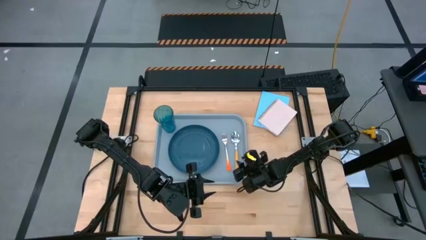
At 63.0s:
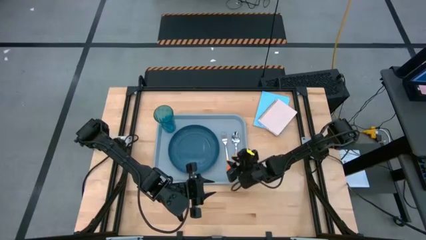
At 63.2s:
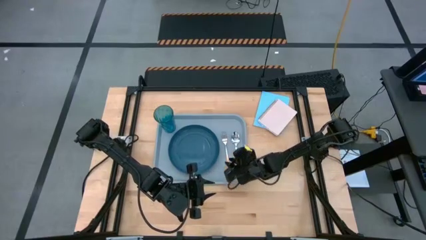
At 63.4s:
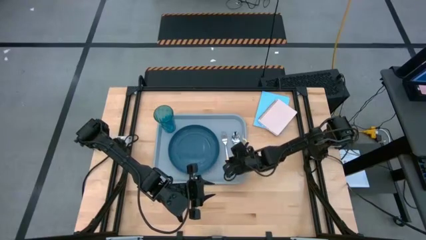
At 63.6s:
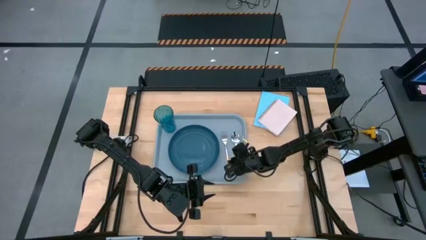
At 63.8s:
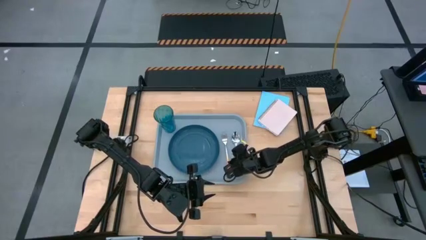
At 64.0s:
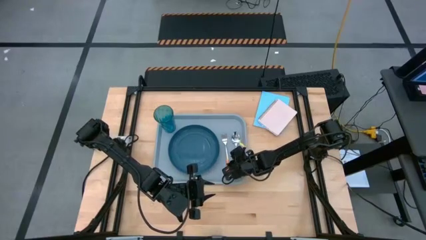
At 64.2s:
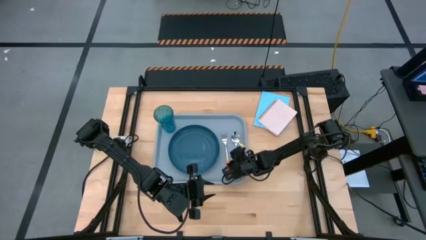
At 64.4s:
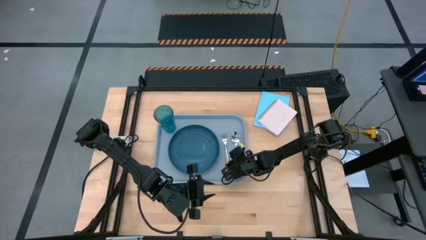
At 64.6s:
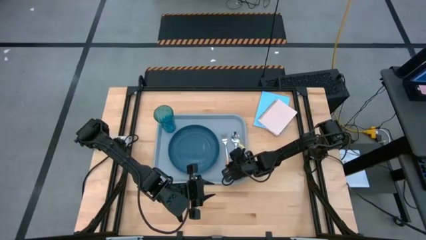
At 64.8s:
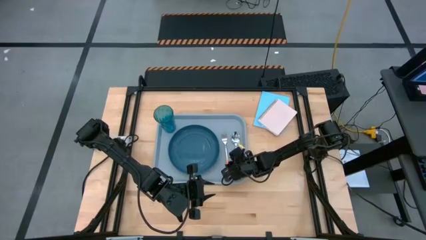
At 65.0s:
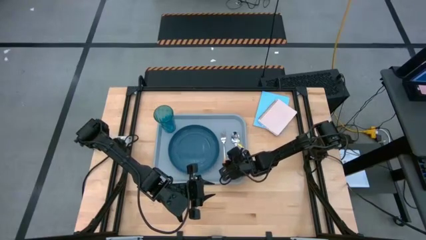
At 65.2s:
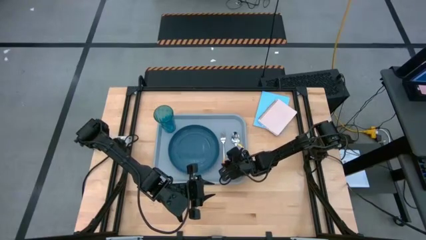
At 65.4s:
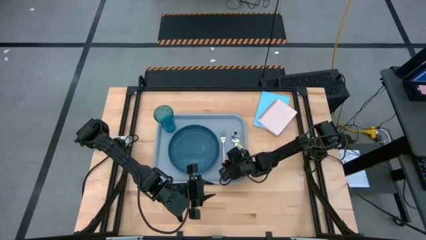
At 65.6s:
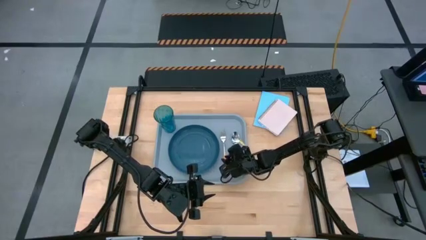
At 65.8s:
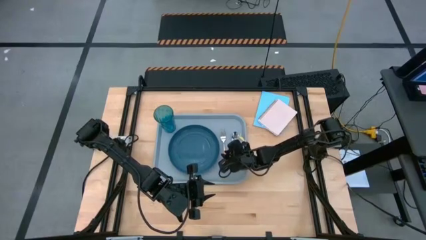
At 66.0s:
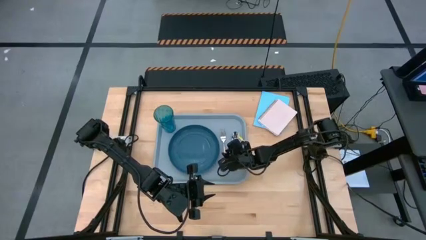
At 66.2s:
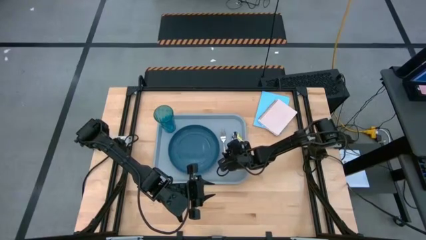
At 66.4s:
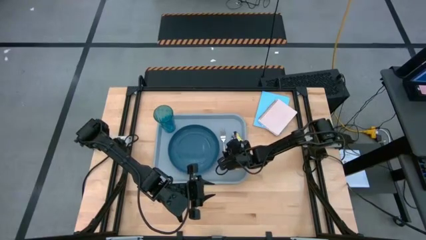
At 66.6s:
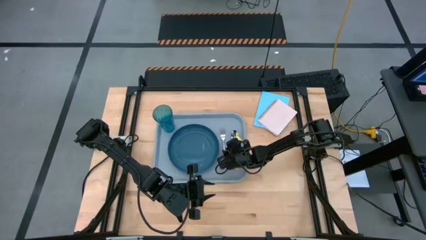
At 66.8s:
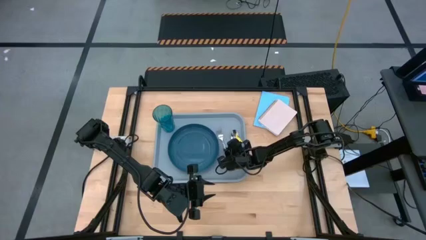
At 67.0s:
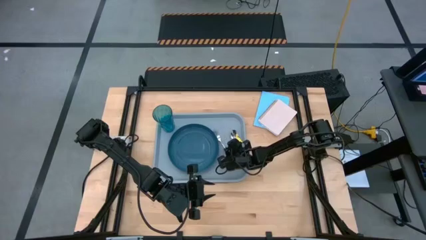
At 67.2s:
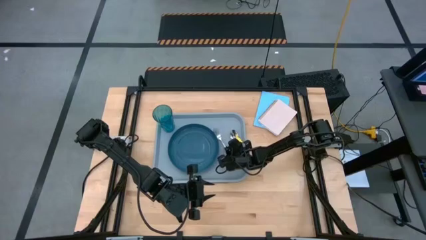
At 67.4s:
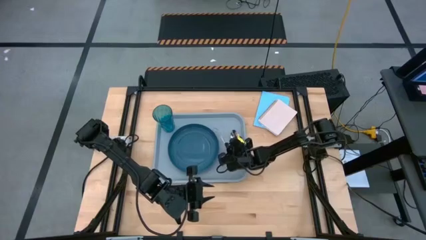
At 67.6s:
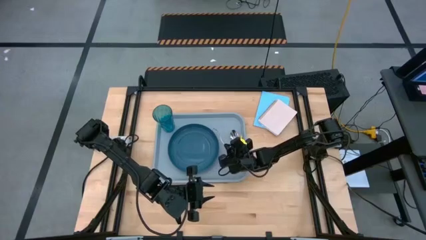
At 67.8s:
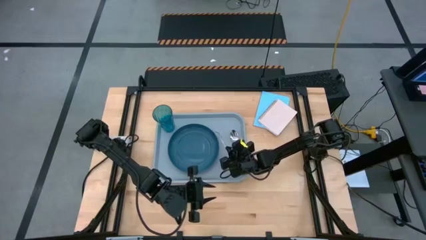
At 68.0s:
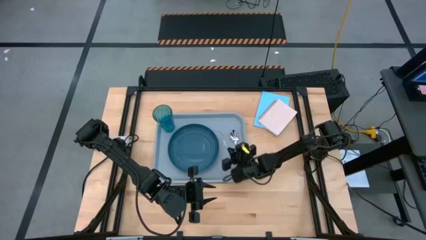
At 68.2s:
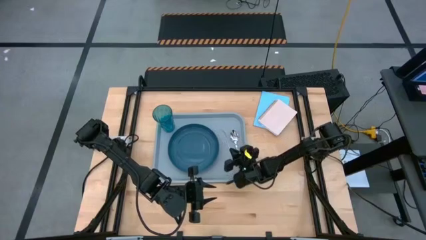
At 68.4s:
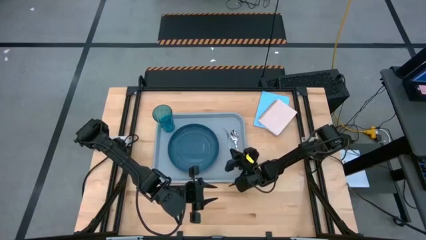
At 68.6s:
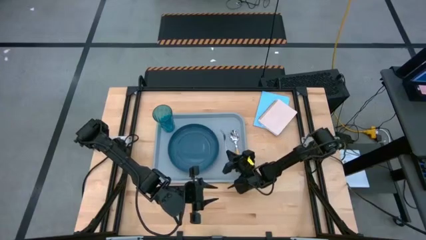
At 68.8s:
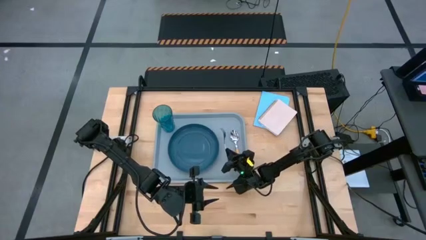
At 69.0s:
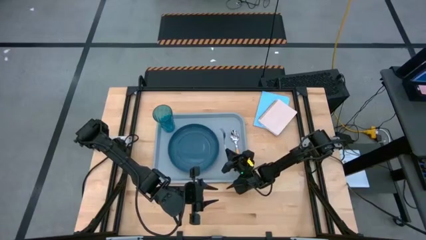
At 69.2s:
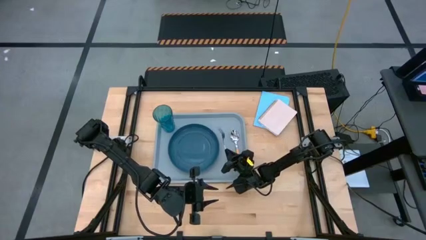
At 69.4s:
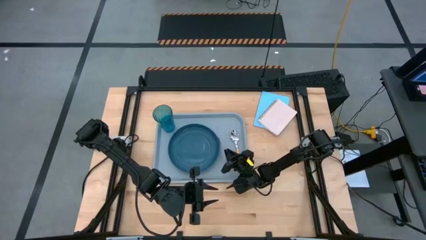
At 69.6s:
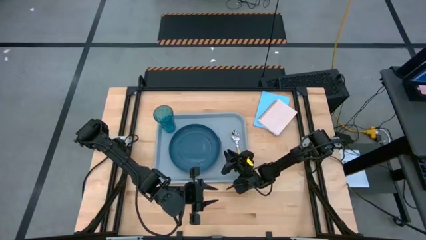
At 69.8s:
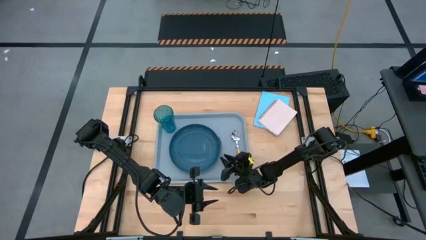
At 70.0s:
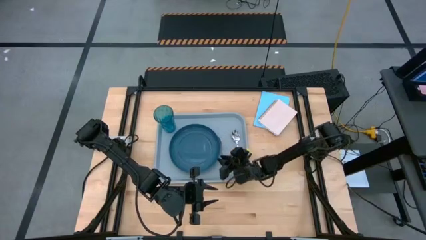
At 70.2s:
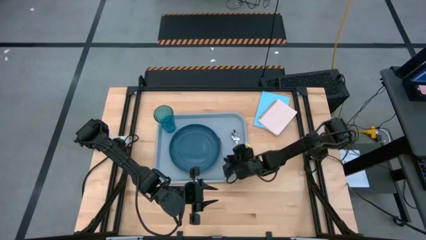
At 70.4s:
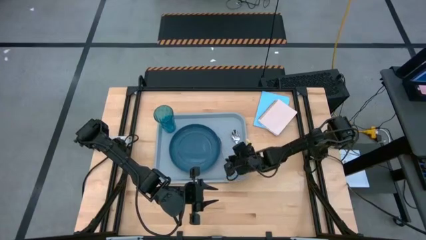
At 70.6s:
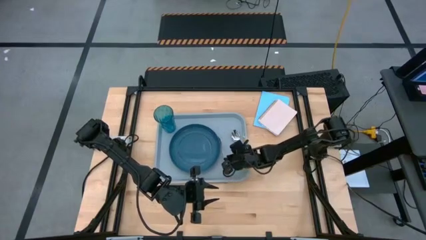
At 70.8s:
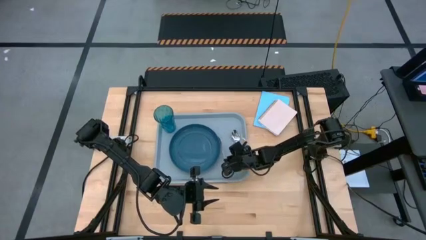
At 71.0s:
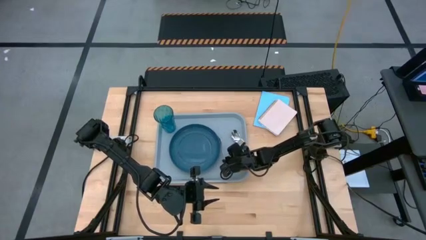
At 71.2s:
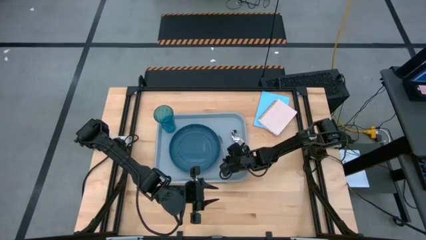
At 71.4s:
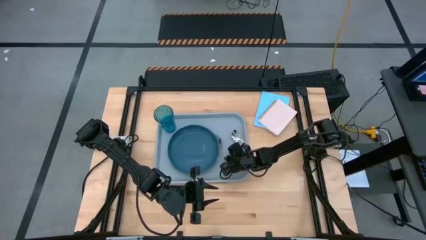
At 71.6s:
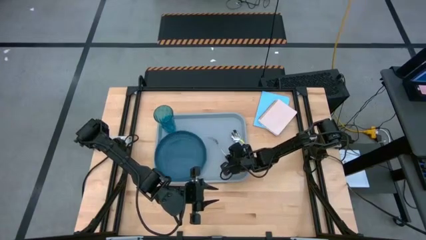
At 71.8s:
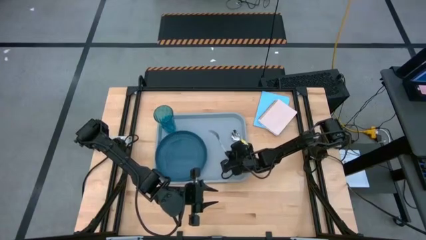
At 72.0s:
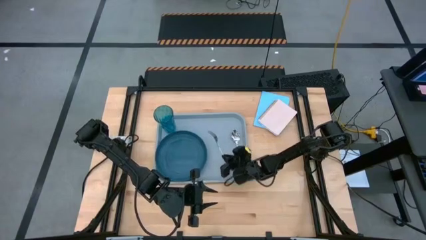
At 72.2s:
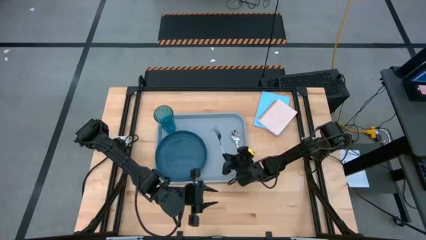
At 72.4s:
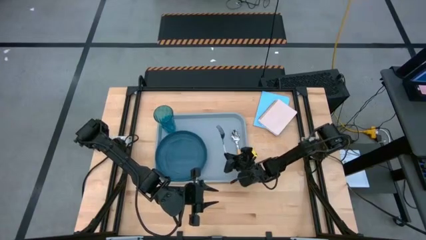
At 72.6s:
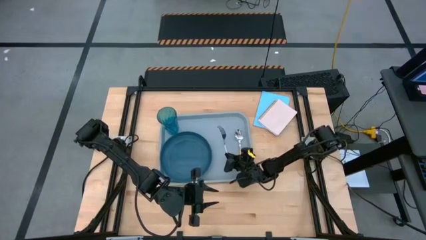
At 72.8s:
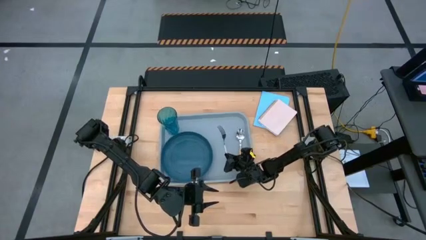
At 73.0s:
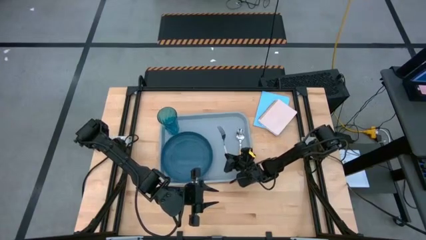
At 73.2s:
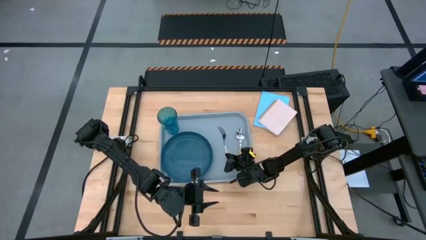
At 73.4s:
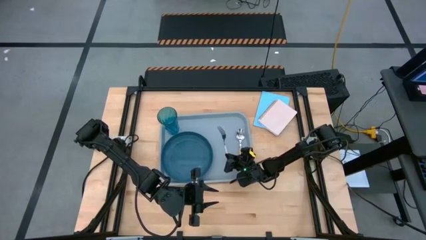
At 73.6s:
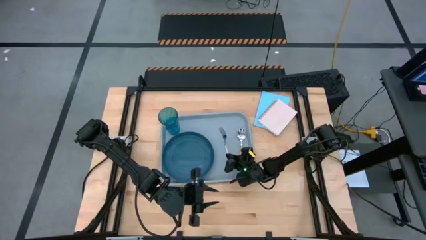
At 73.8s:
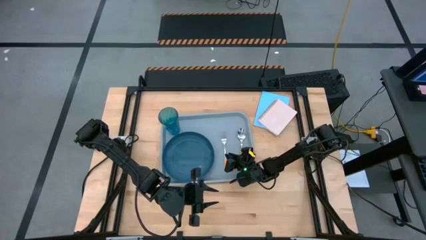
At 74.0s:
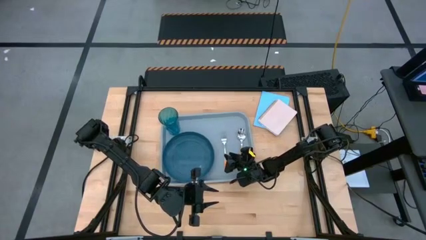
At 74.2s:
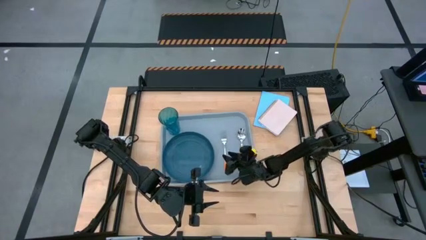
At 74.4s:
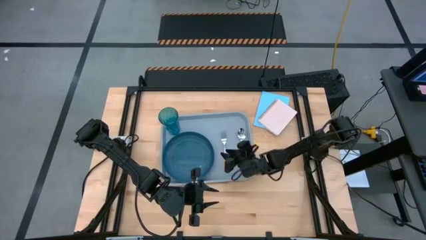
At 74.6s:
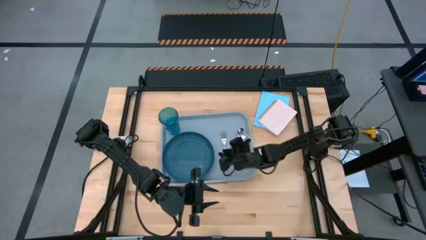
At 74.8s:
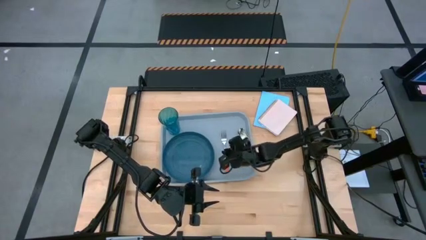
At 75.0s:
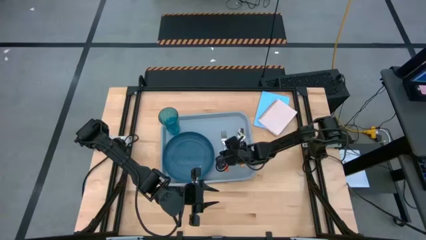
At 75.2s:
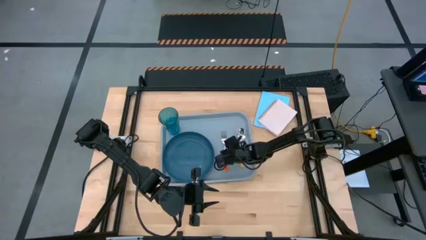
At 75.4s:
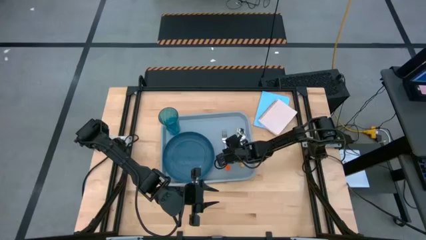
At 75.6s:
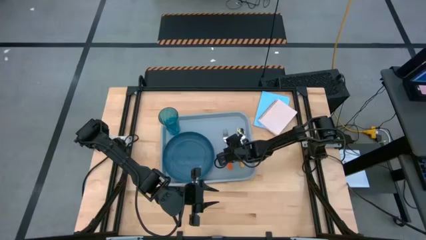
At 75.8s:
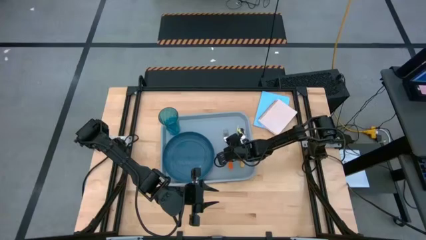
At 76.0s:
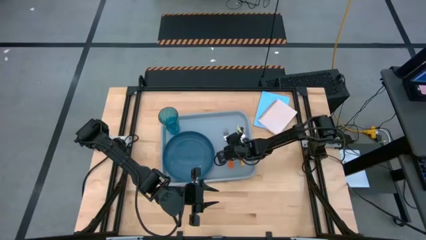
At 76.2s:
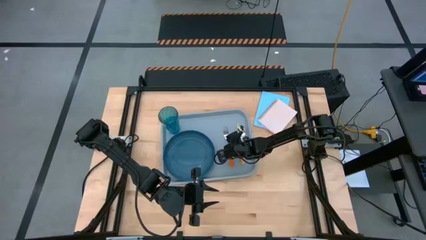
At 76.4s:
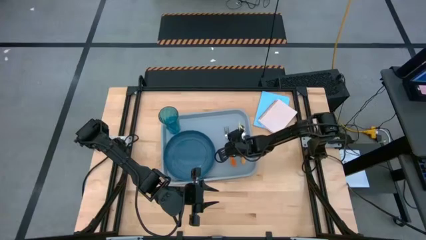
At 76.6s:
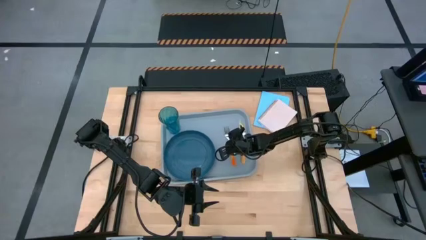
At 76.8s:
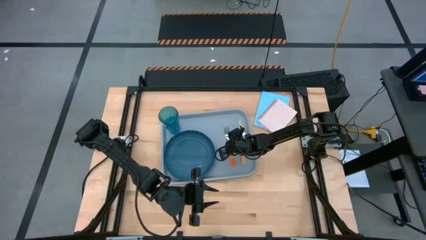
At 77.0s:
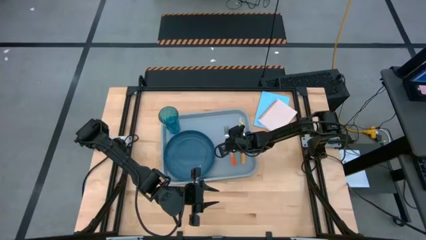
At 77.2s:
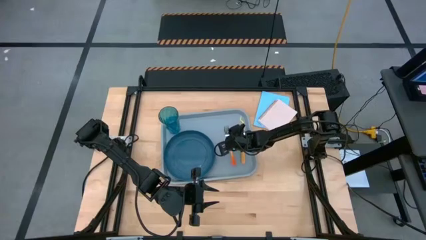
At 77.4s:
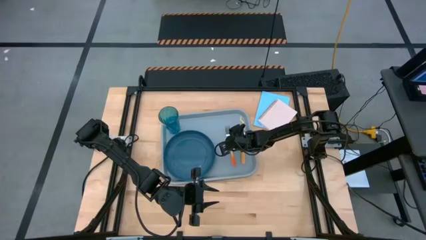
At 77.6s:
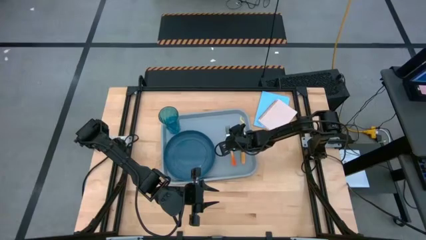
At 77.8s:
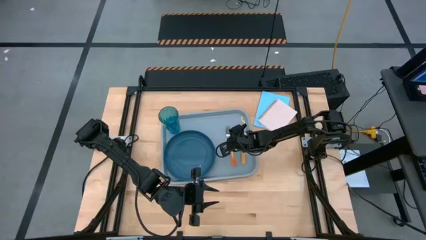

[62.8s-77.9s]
Task: Pick and place plate/cup/fork/spoon on tray
Adjust the orange fork on the gray serving tray

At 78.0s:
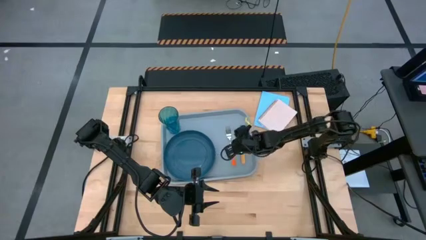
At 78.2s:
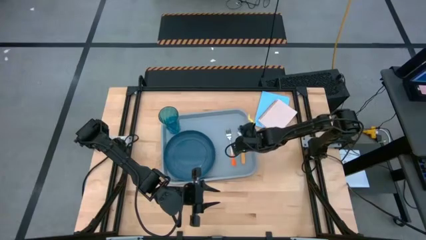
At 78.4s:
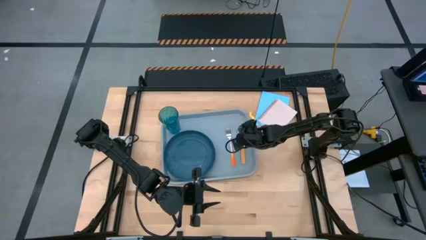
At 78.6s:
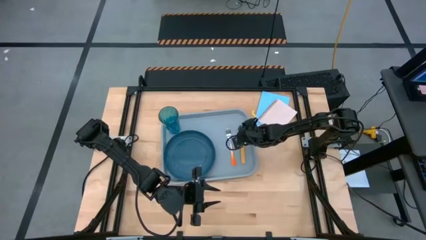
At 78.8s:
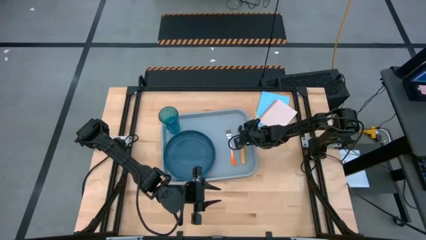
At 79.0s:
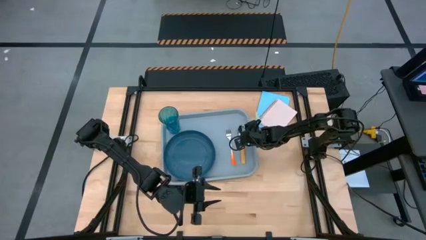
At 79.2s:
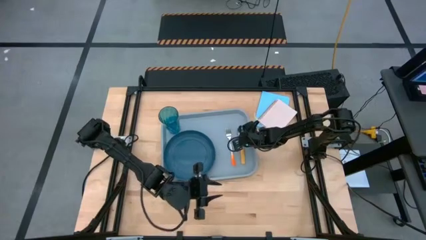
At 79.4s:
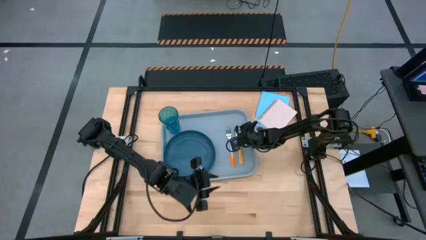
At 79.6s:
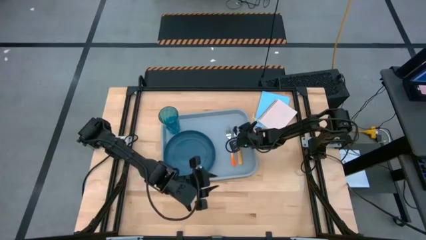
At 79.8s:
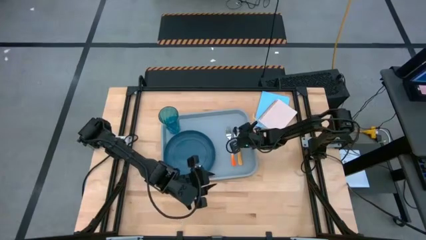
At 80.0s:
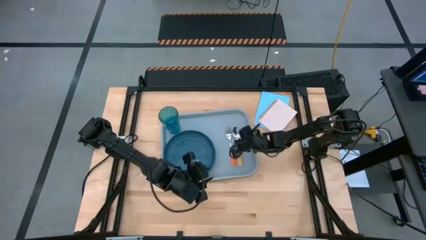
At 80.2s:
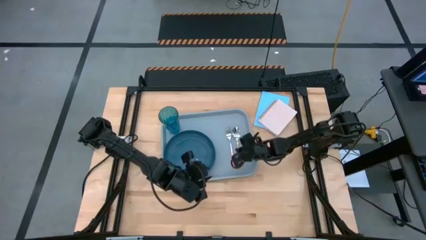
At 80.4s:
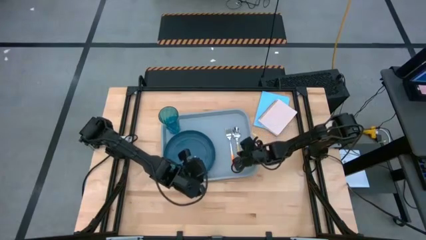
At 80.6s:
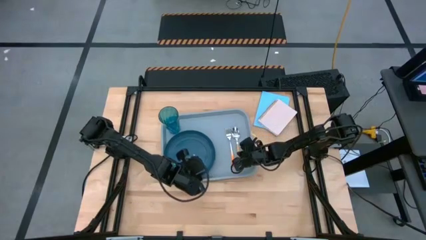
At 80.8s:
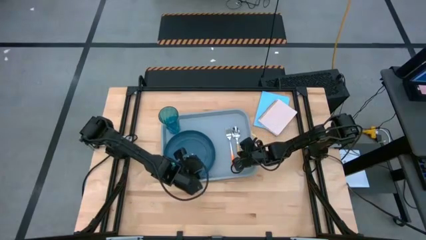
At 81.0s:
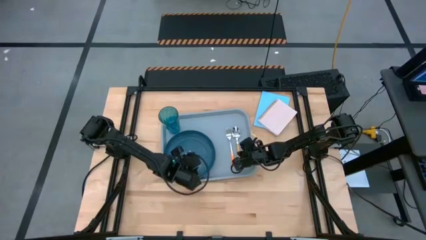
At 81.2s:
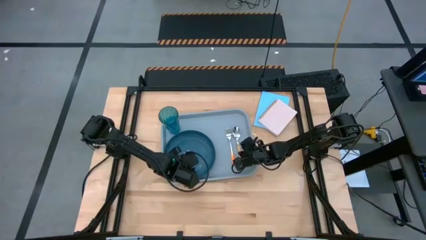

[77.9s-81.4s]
Adjust the yellow spoon on the gray serving tray
